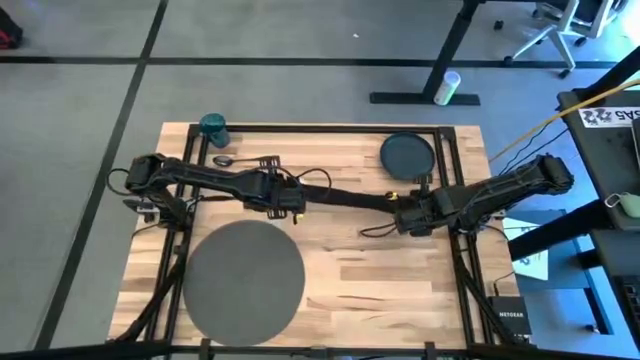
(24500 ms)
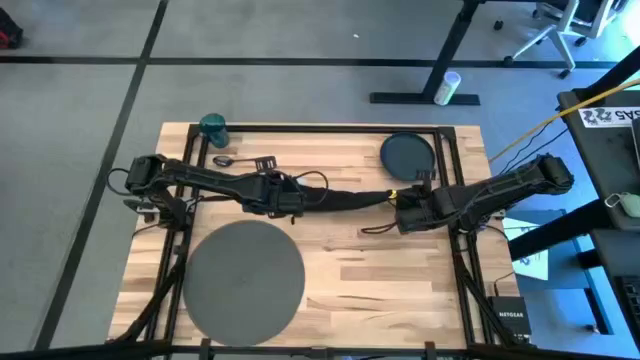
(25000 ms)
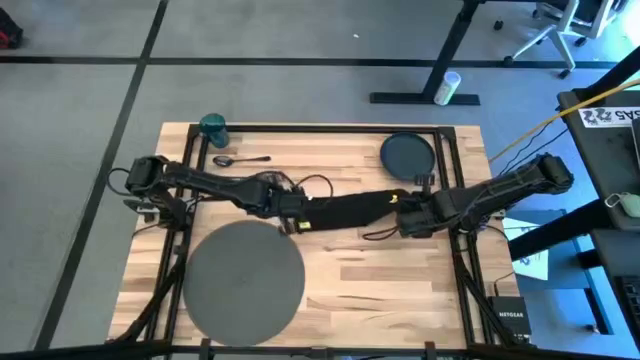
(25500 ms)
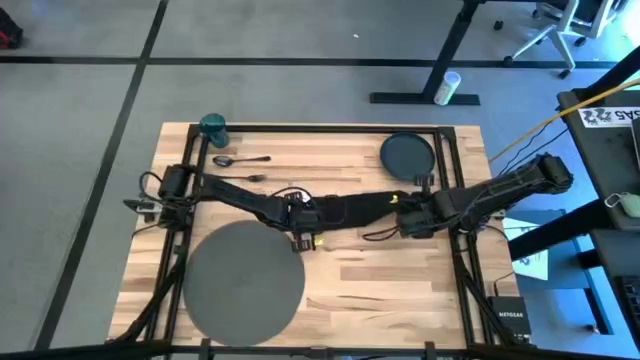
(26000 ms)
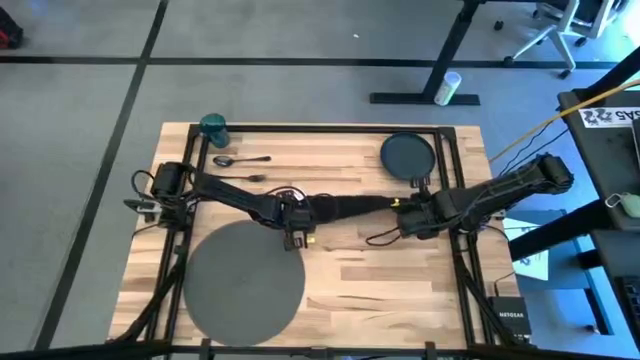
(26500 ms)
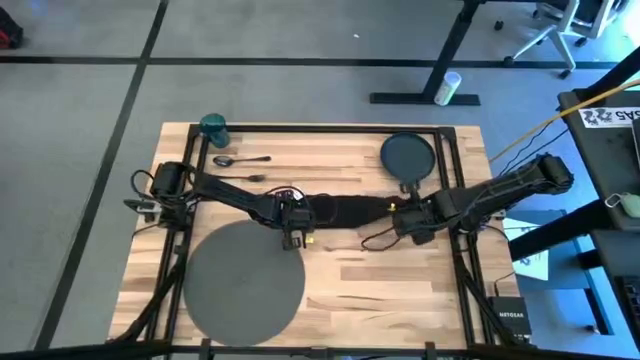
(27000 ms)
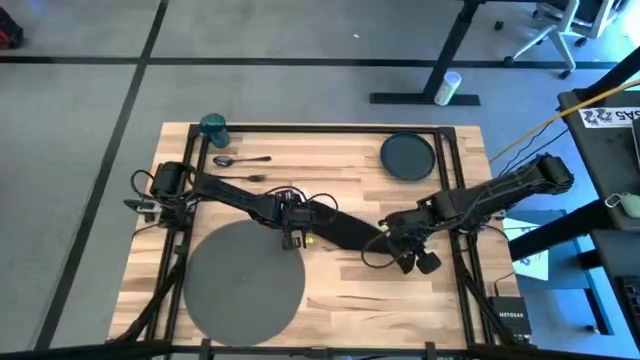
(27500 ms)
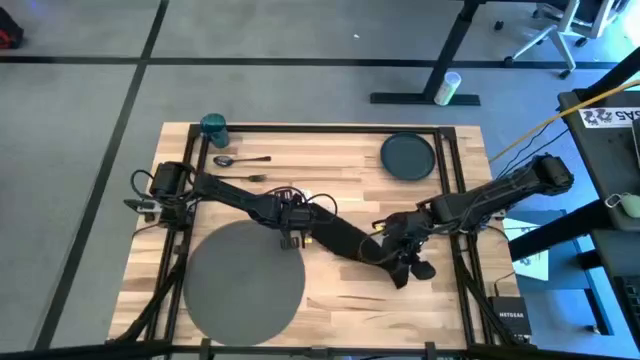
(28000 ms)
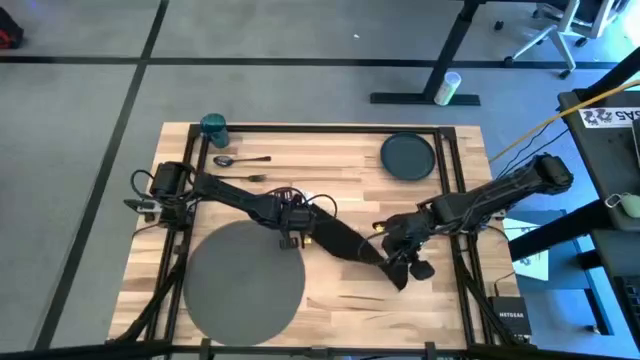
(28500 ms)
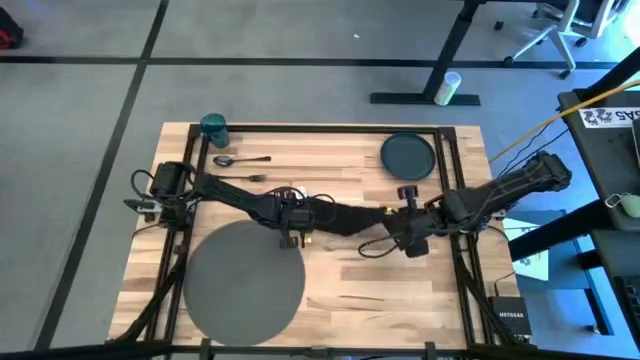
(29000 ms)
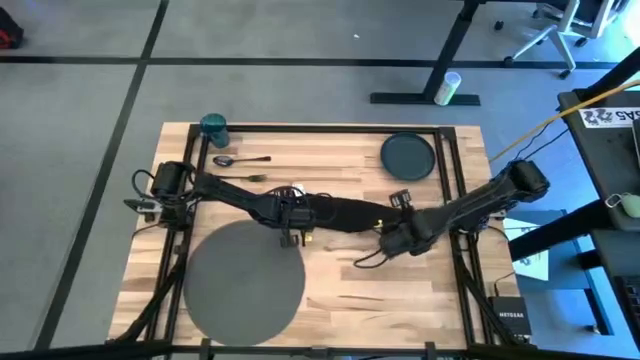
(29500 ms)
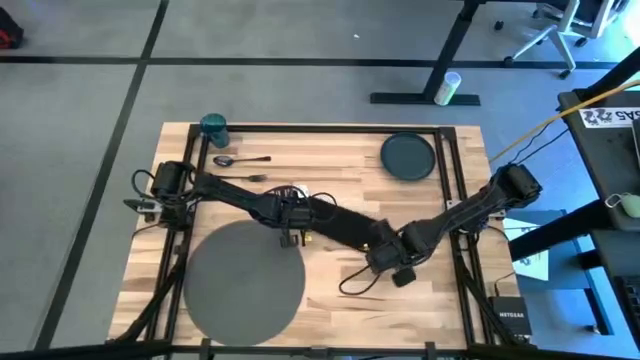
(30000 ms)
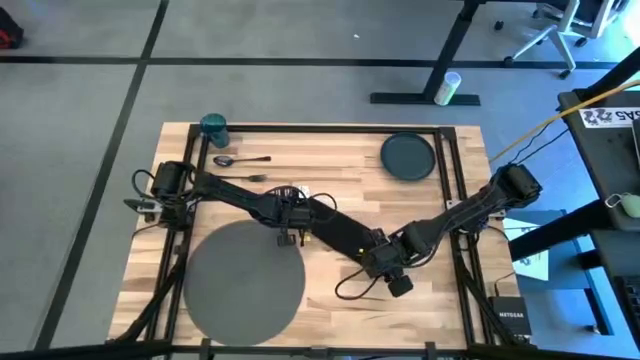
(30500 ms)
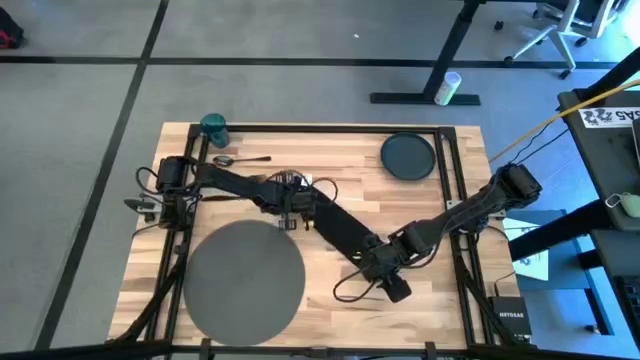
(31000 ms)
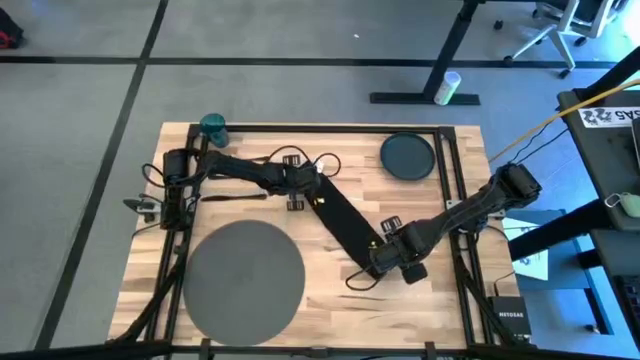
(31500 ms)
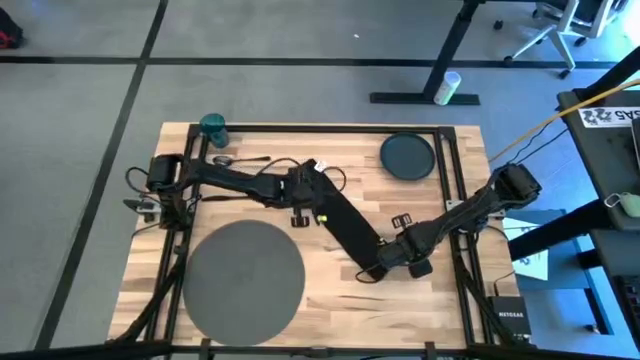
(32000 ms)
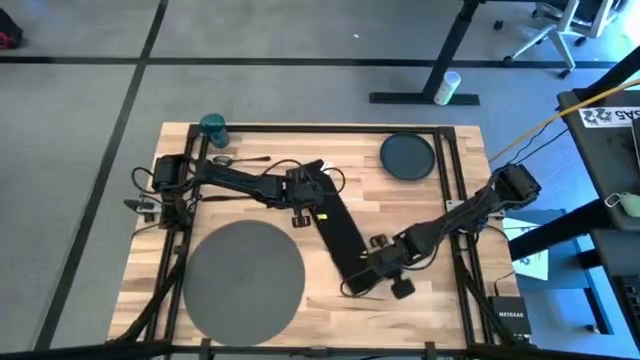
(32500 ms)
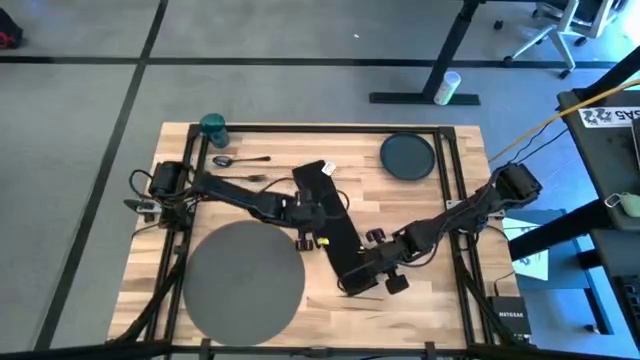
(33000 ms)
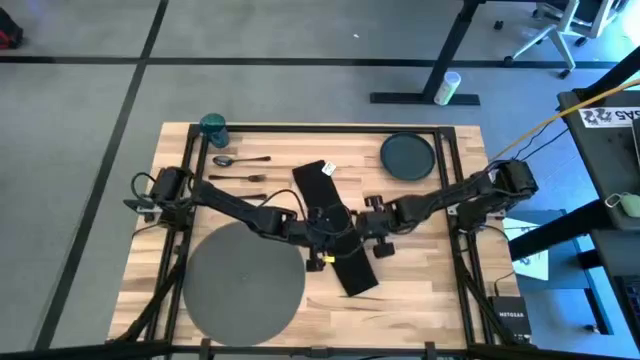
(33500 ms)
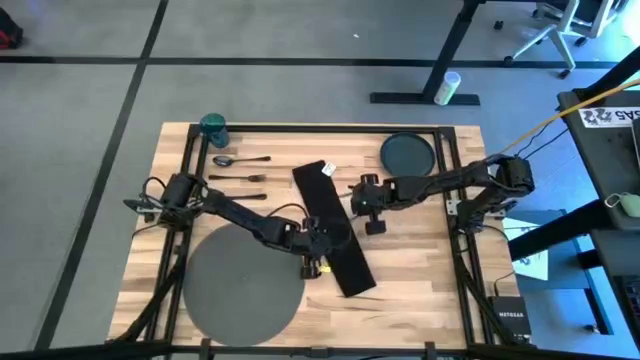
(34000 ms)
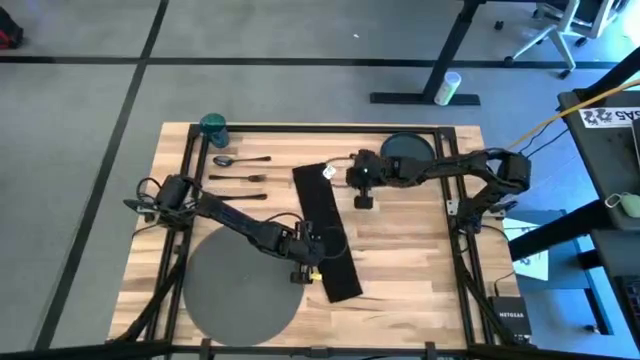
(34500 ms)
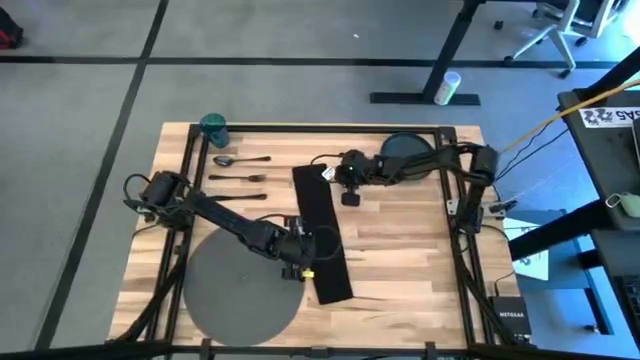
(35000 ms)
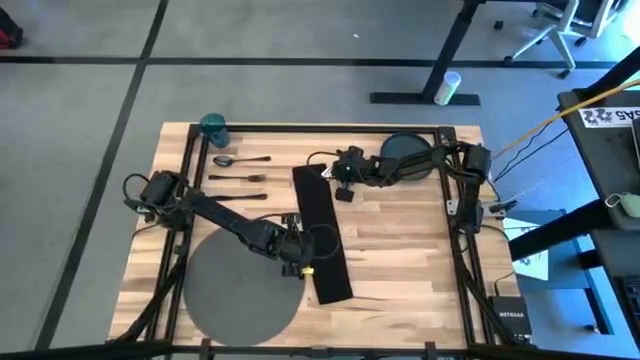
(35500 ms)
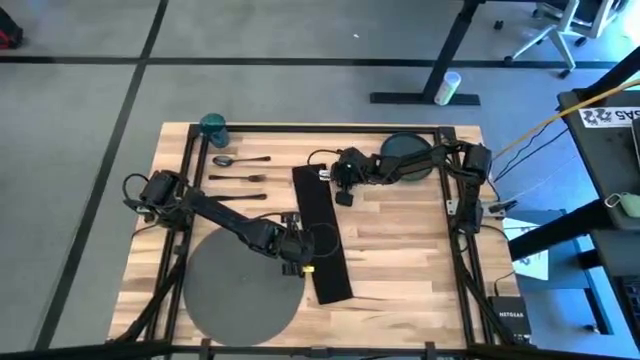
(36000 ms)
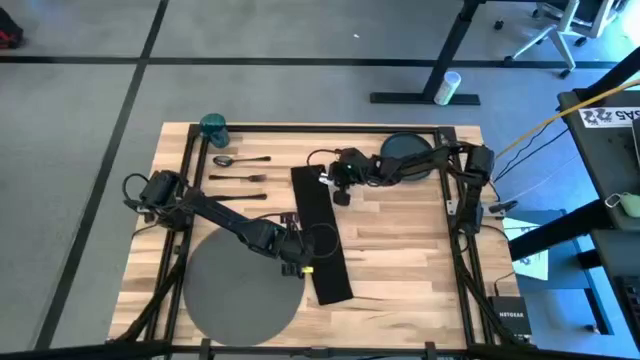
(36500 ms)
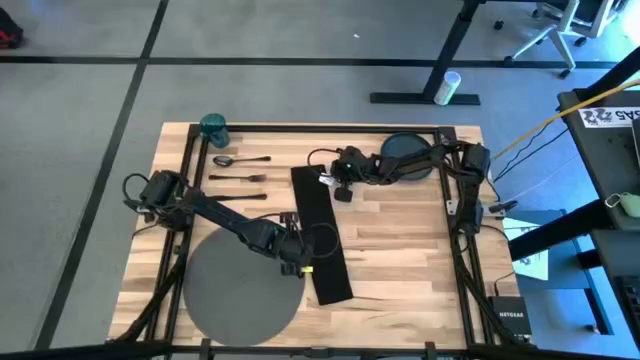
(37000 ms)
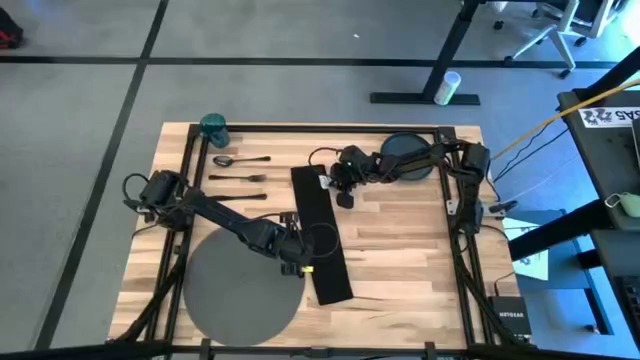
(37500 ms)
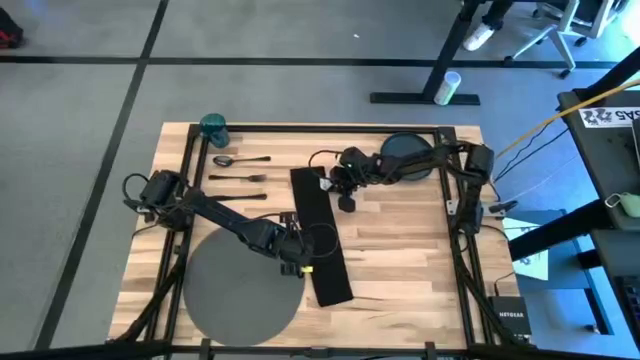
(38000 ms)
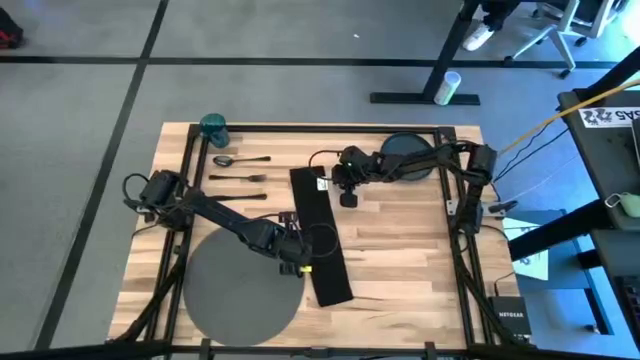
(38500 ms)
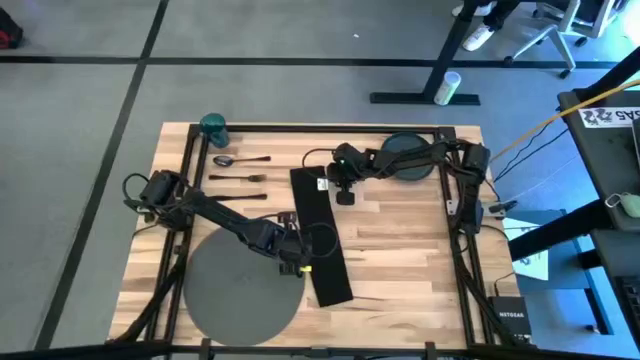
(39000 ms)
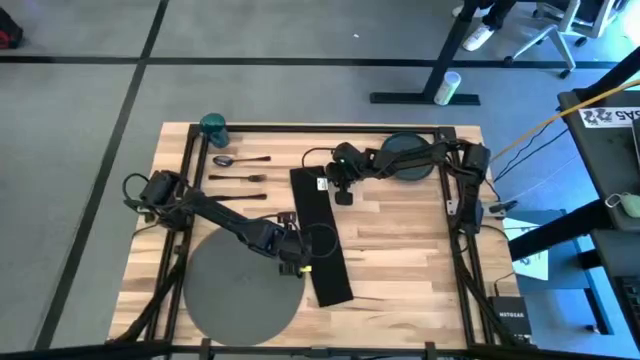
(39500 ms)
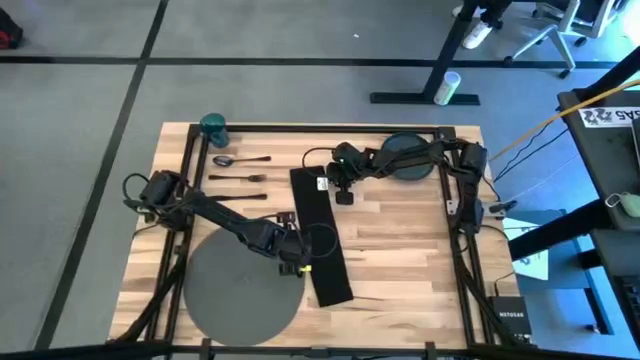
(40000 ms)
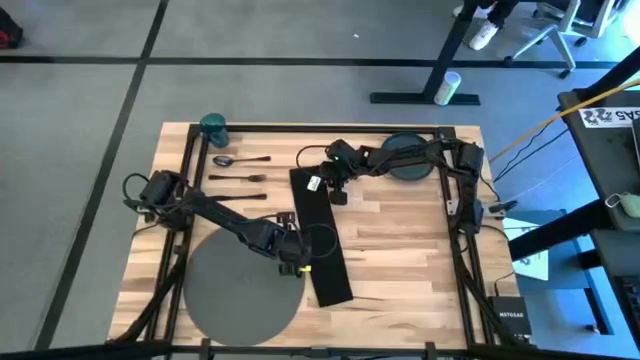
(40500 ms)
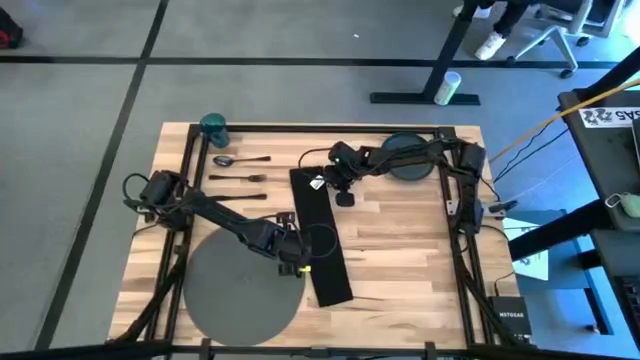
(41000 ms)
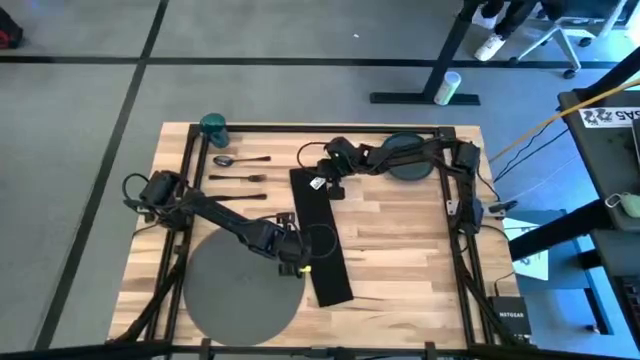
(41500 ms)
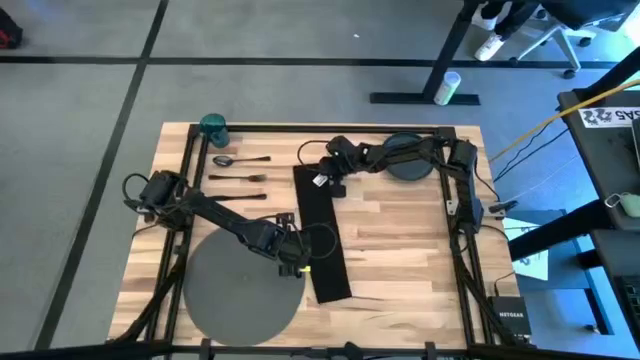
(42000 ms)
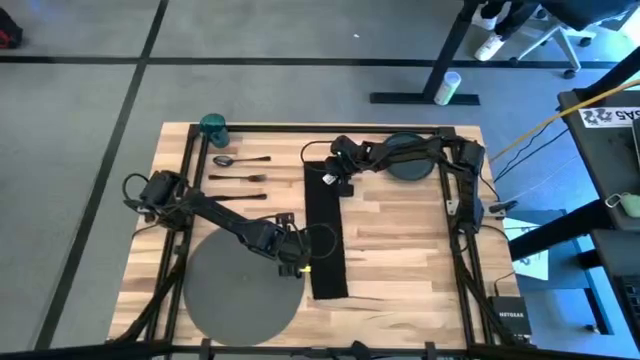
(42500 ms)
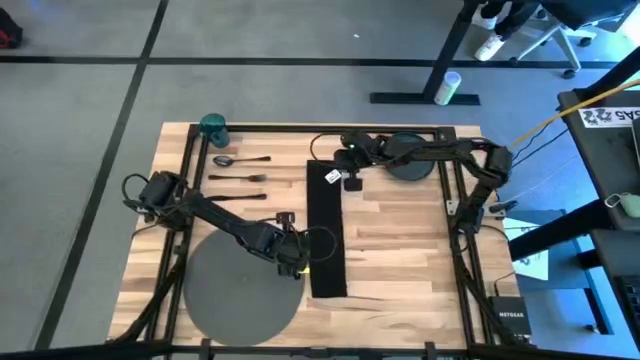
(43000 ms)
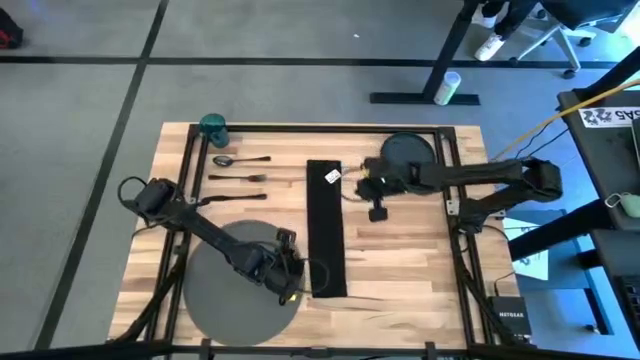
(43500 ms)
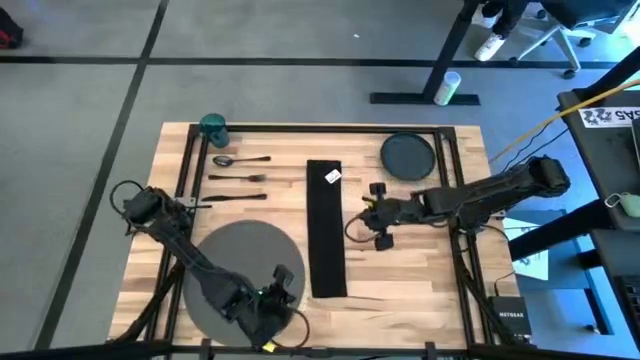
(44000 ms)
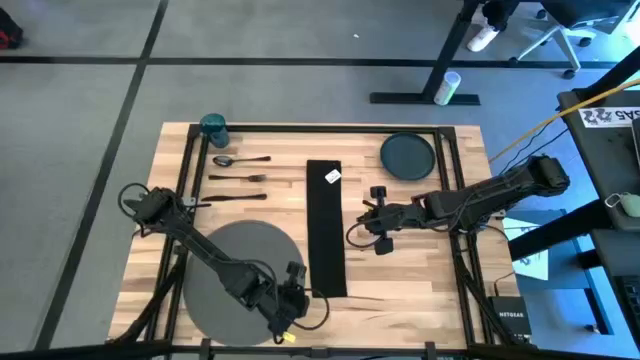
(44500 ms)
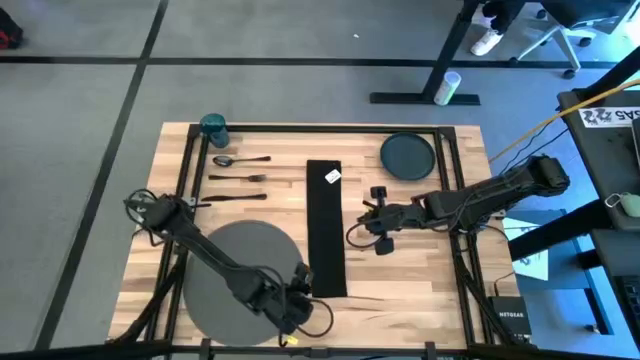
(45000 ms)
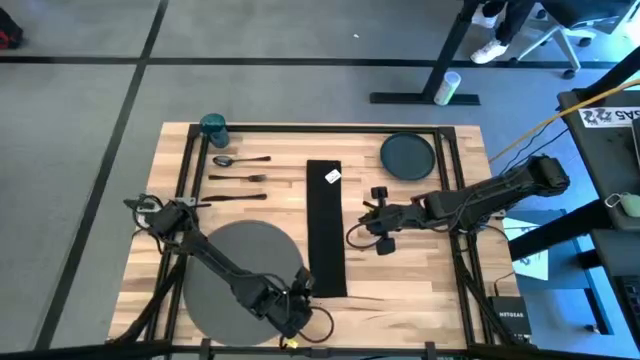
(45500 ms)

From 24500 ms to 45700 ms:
Task: Set table place
Fold the black table napkin
